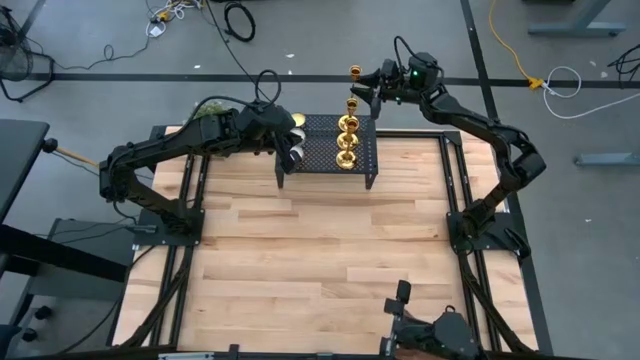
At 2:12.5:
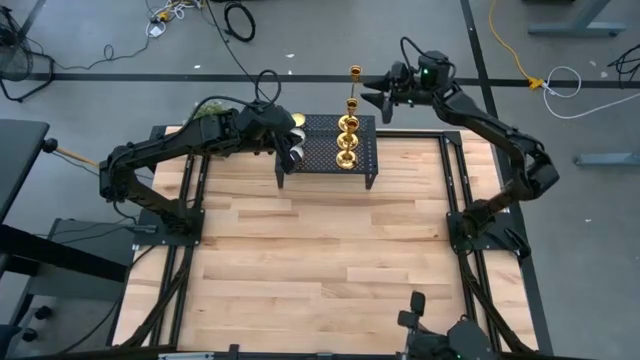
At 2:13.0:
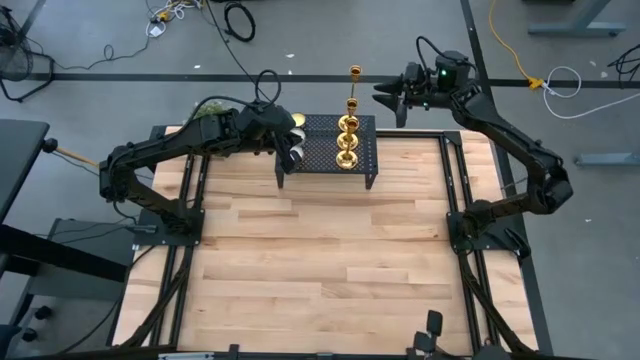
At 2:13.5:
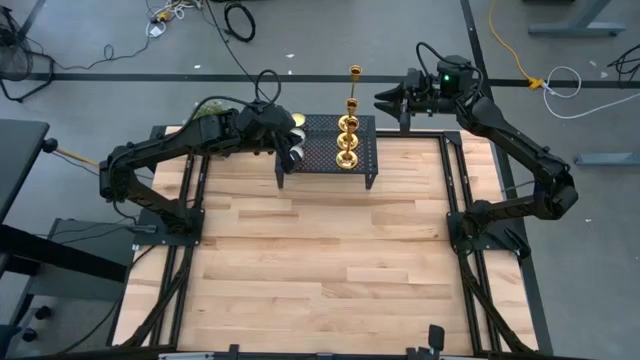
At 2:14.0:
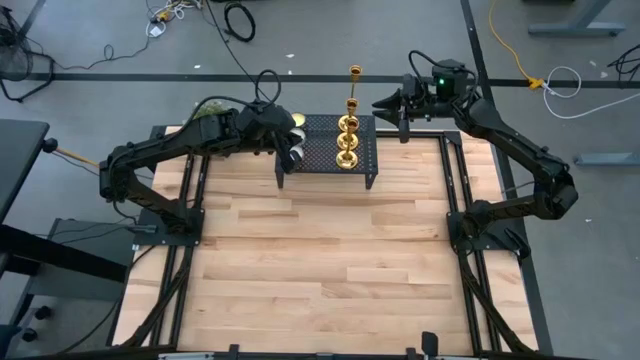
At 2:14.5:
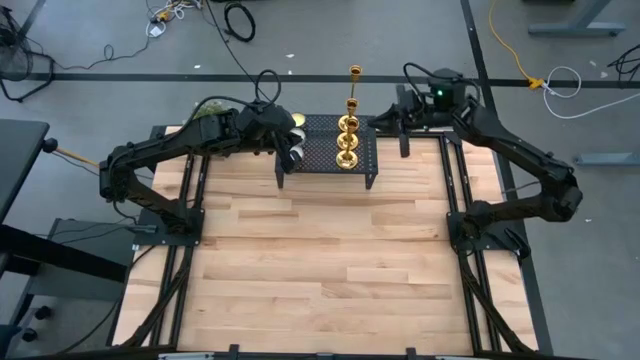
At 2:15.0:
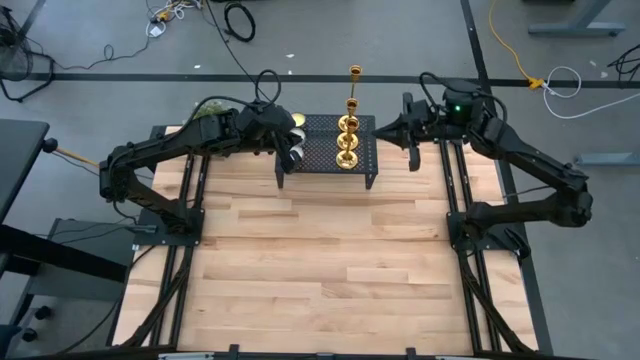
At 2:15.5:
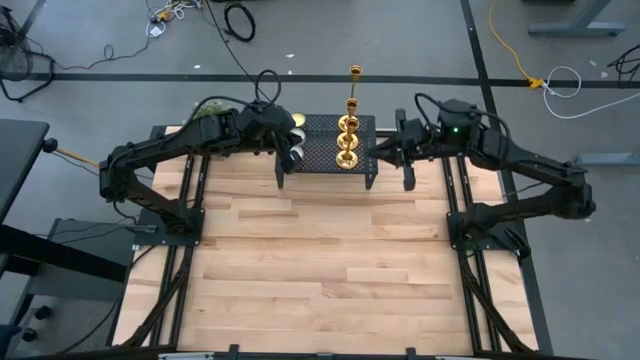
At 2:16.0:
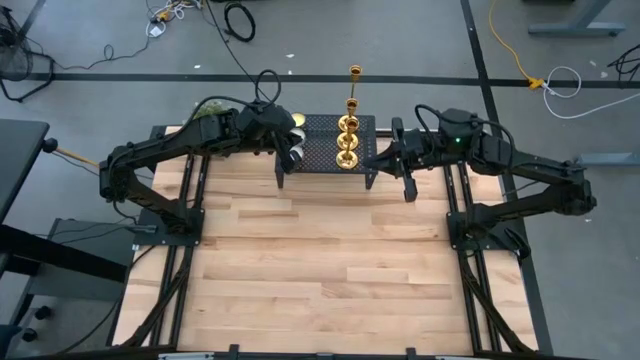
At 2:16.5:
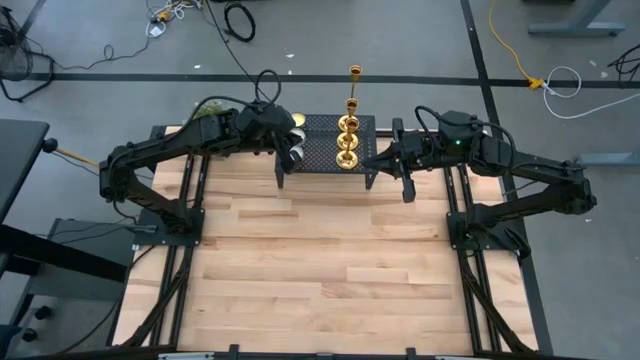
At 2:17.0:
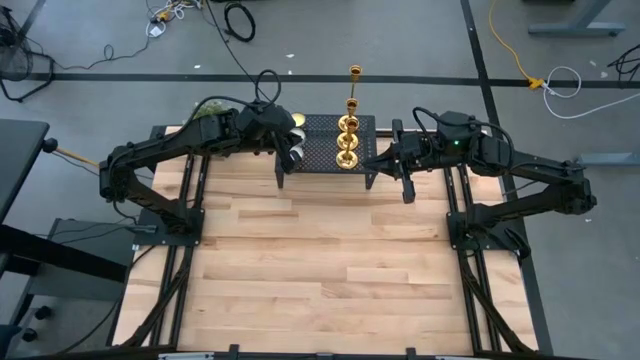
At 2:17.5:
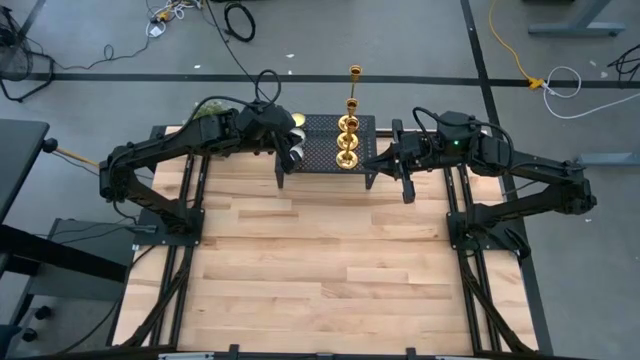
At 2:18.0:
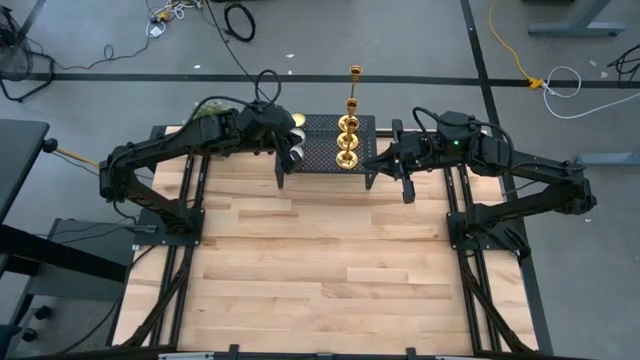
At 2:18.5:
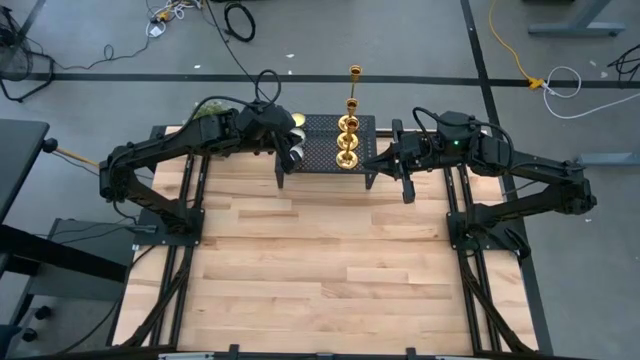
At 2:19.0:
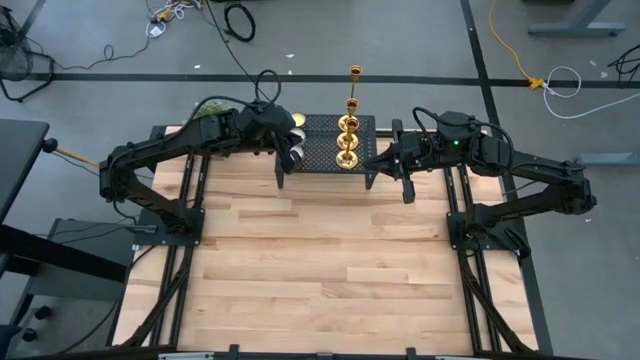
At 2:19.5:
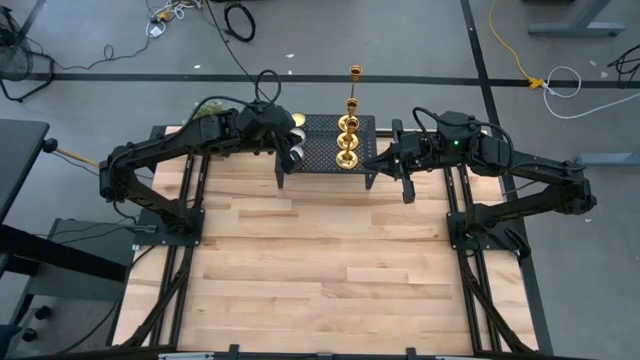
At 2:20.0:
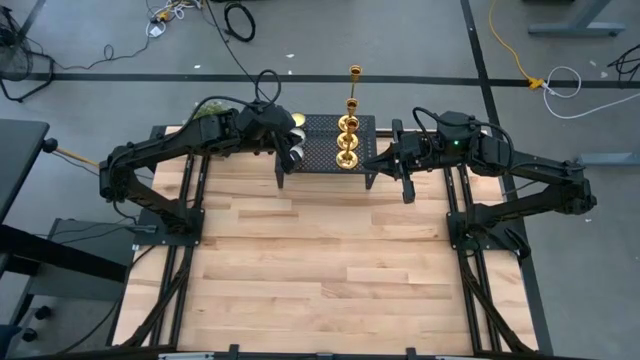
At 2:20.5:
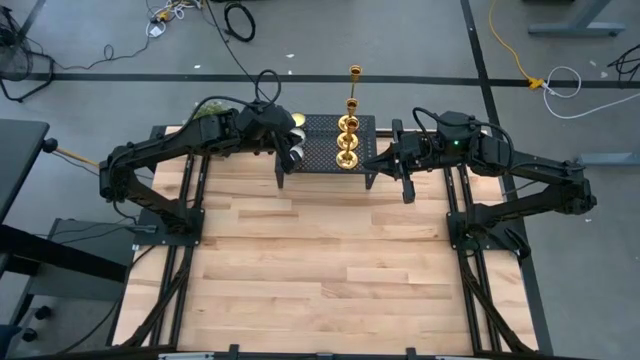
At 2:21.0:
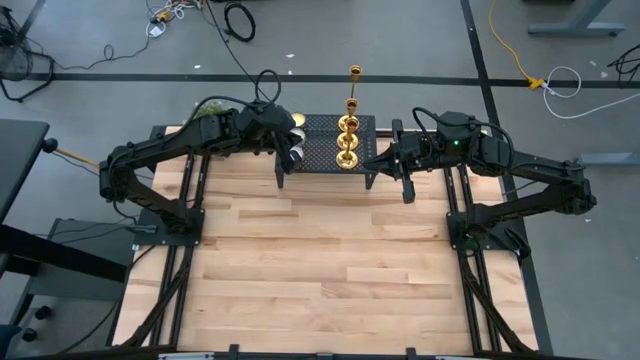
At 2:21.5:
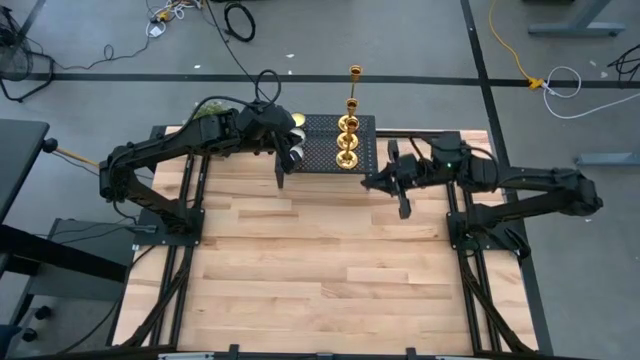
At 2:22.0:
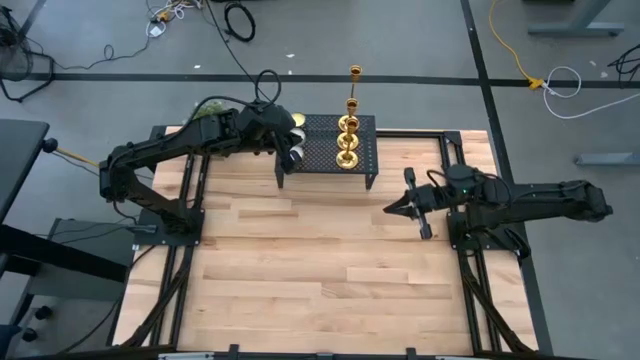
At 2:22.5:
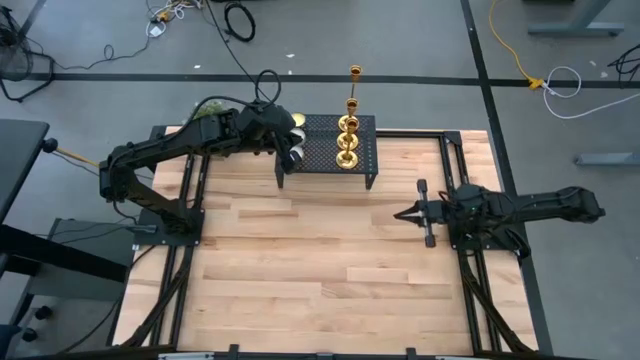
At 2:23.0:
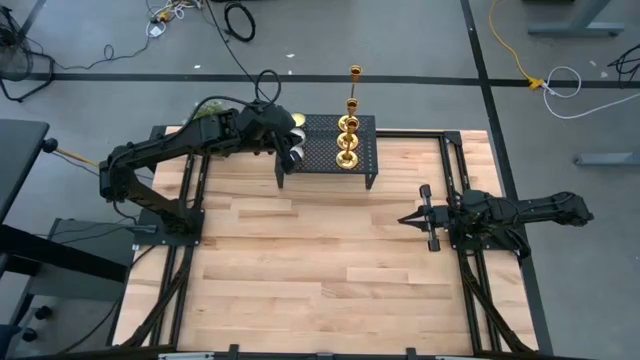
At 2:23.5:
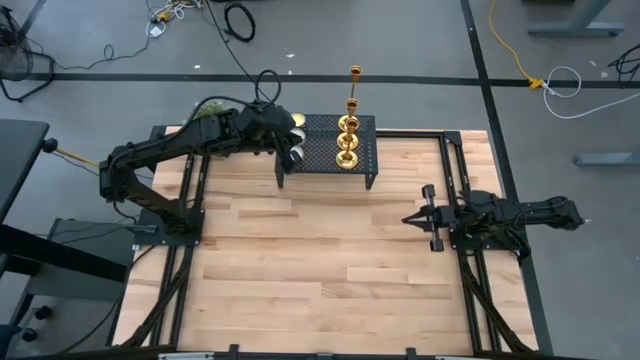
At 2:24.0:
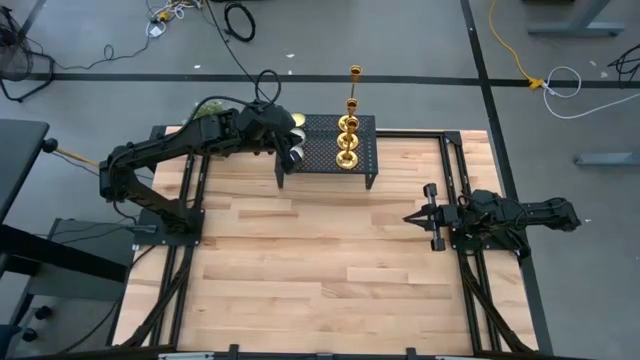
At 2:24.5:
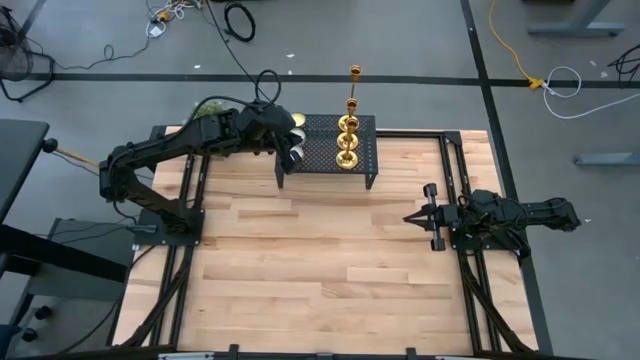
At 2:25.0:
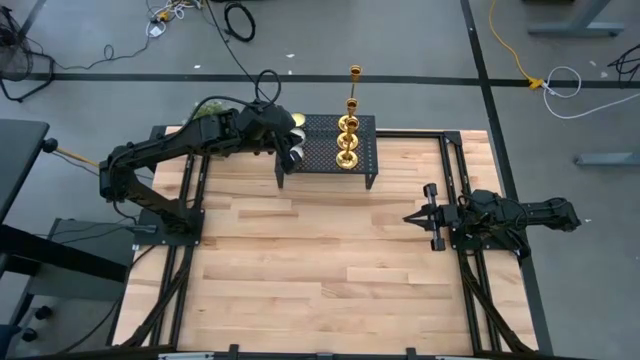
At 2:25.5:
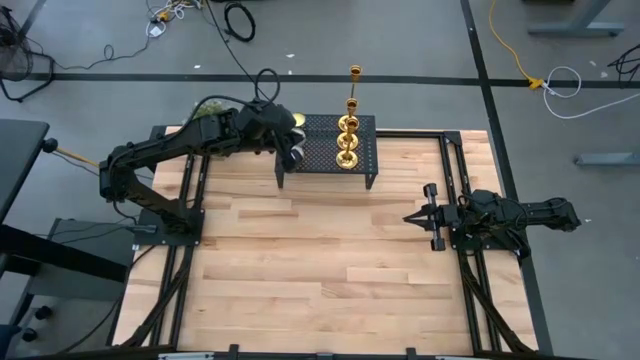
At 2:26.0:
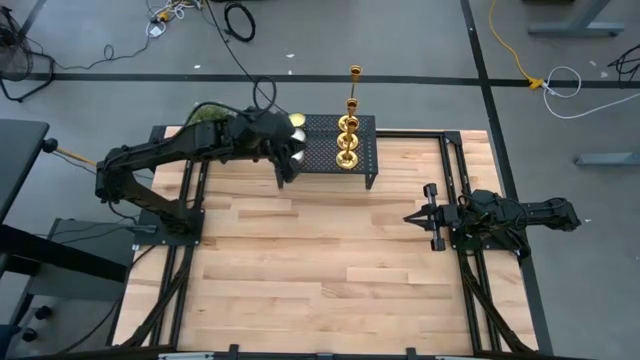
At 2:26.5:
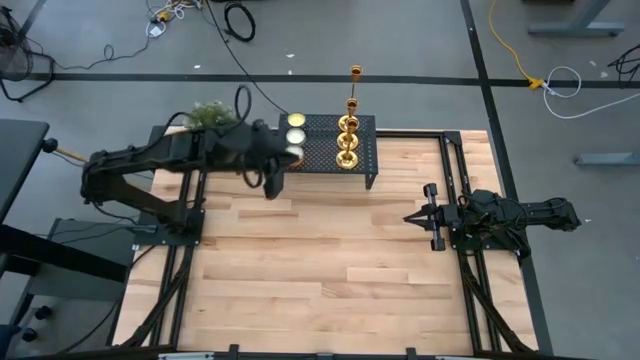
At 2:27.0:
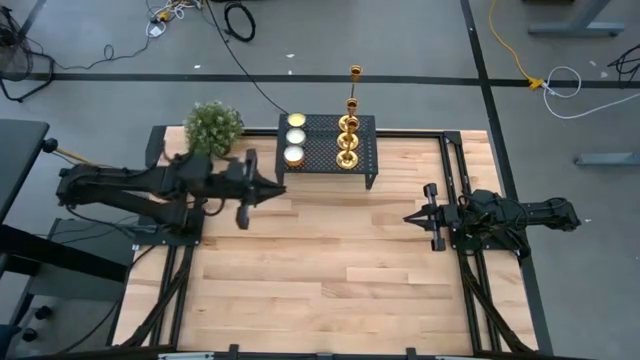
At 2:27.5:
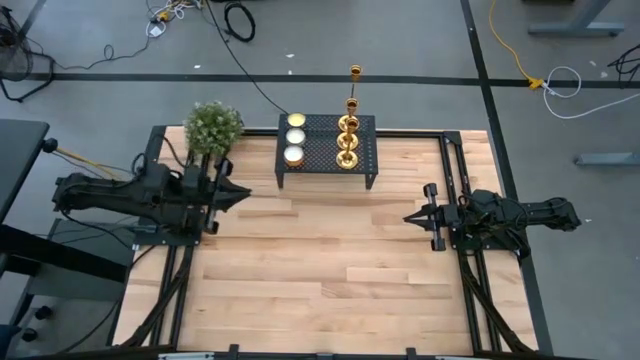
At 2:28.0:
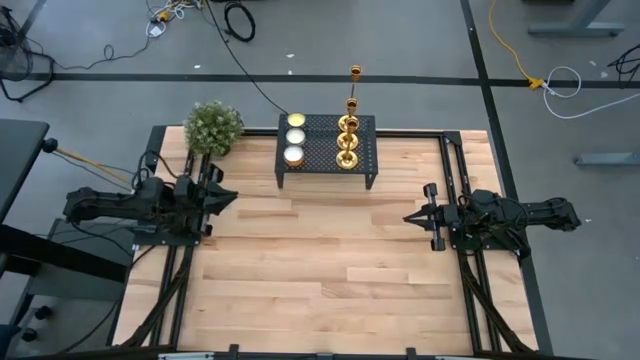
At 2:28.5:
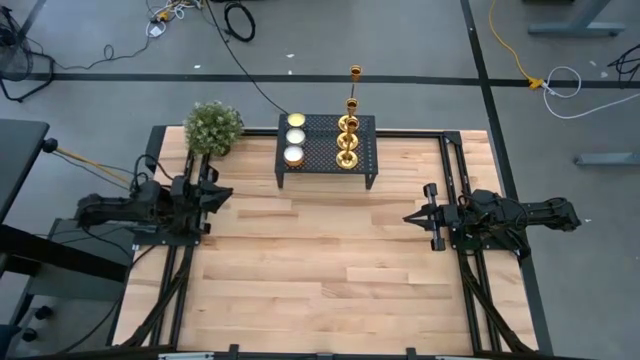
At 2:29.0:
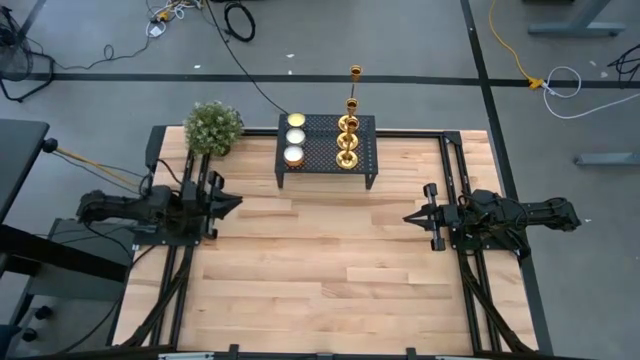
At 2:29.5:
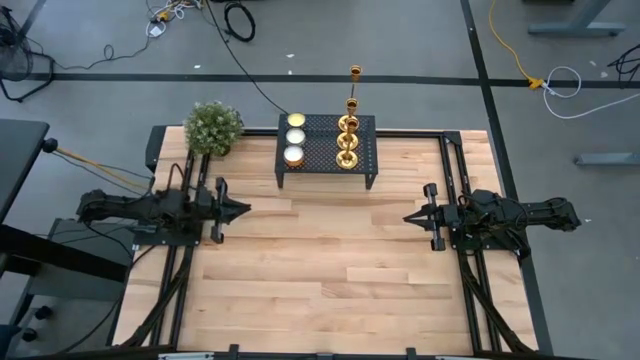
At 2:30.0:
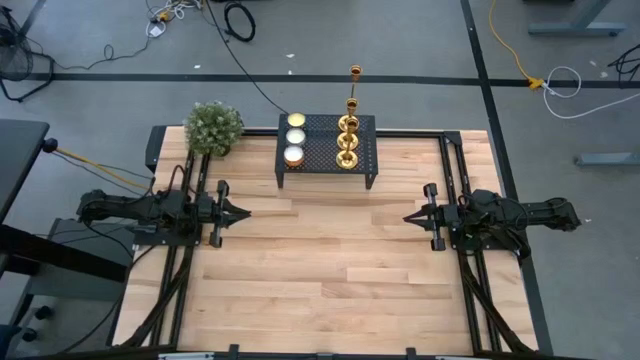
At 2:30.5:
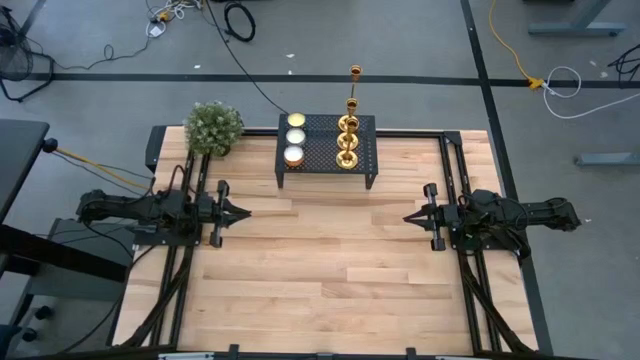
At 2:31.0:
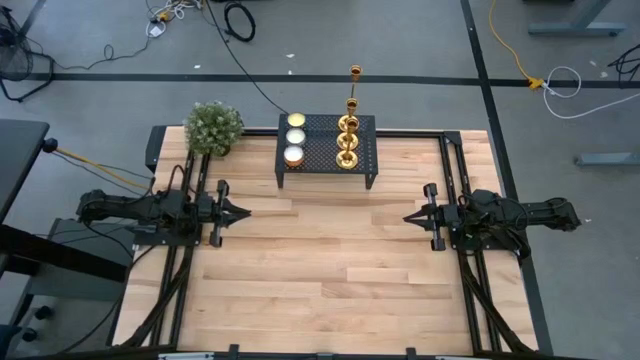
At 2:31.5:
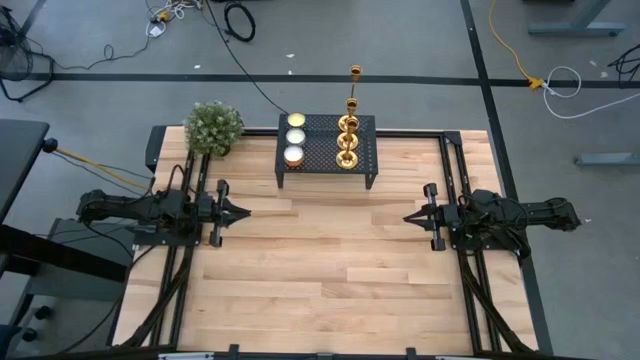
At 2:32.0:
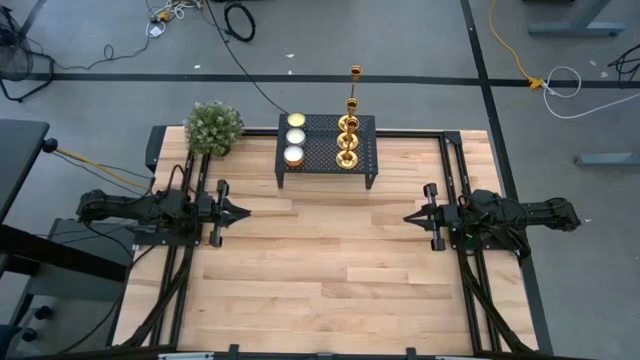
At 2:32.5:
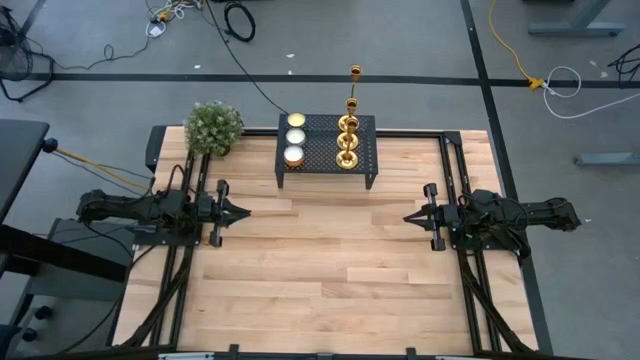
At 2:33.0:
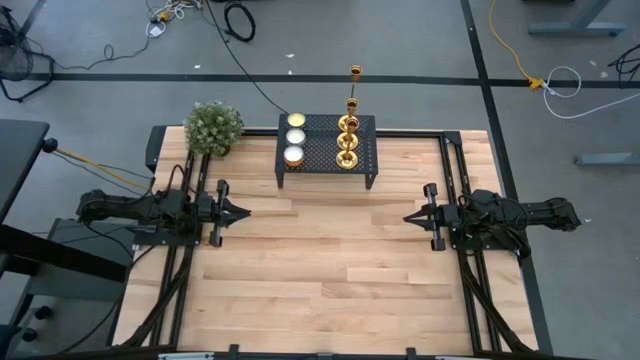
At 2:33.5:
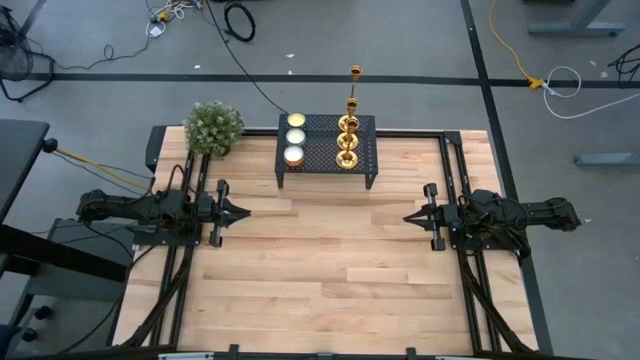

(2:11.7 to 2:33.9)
Task: Pick & Place candle stick holders
Return to Home Position
